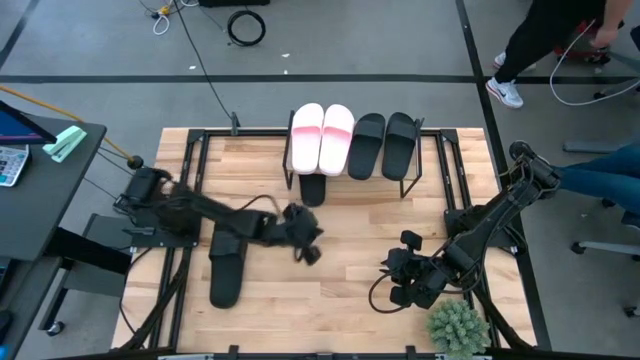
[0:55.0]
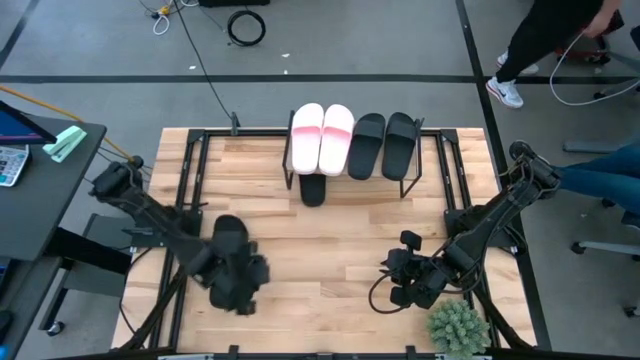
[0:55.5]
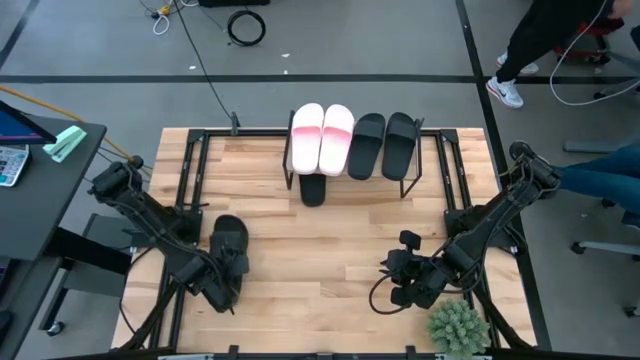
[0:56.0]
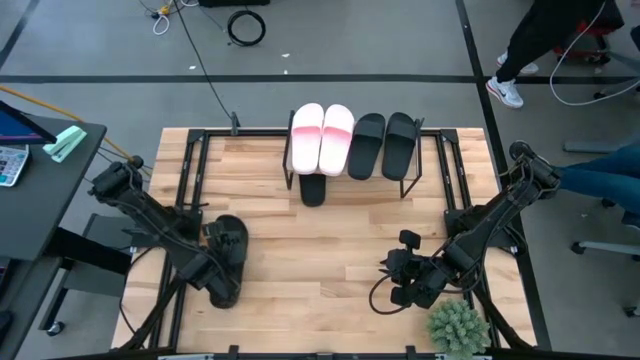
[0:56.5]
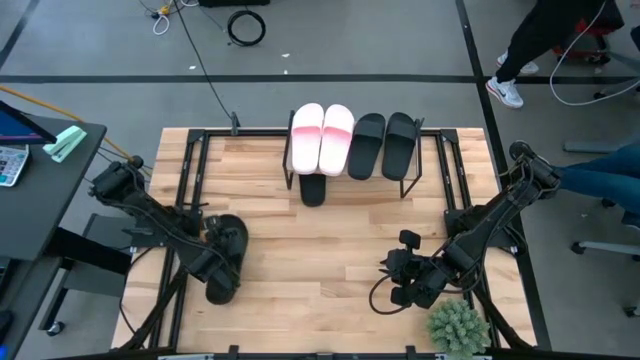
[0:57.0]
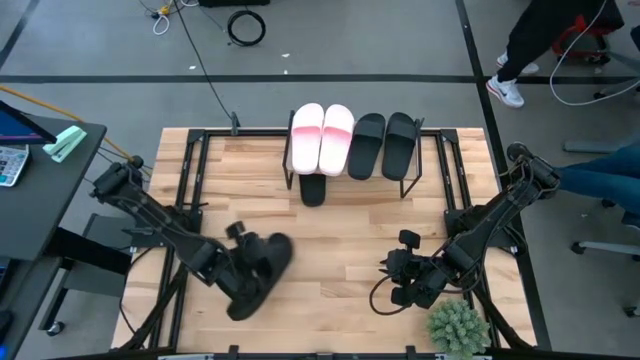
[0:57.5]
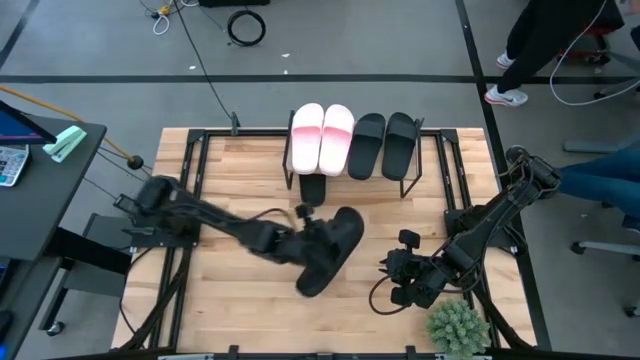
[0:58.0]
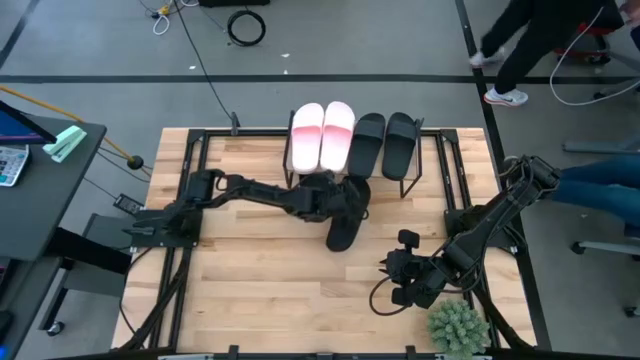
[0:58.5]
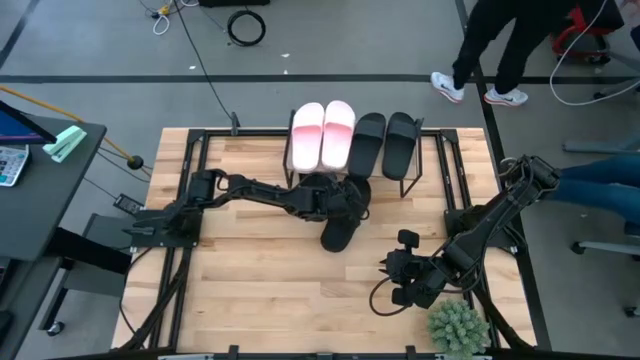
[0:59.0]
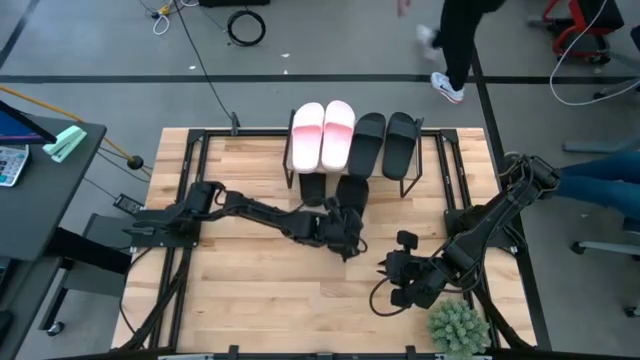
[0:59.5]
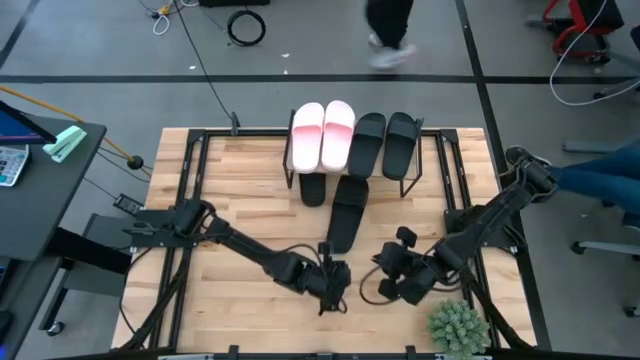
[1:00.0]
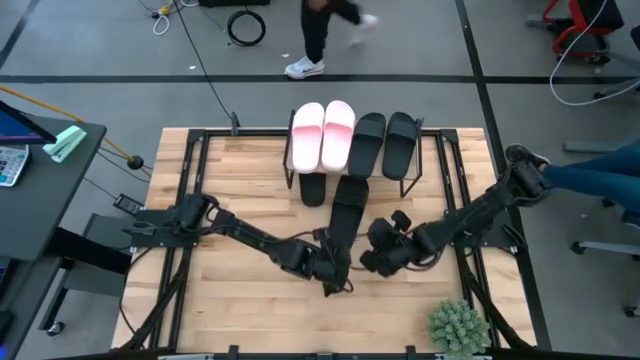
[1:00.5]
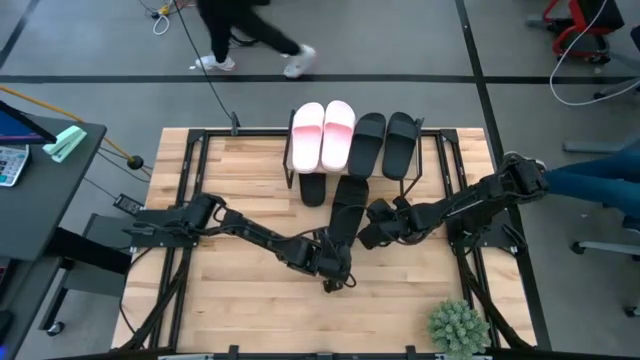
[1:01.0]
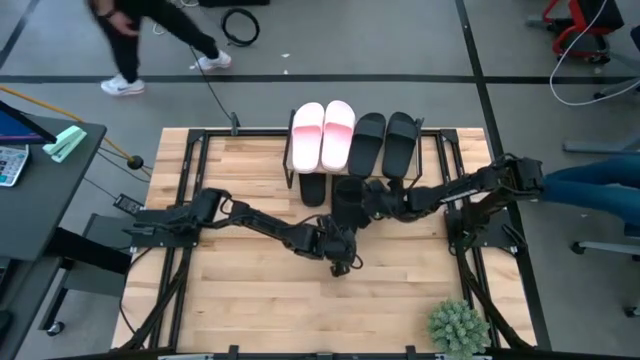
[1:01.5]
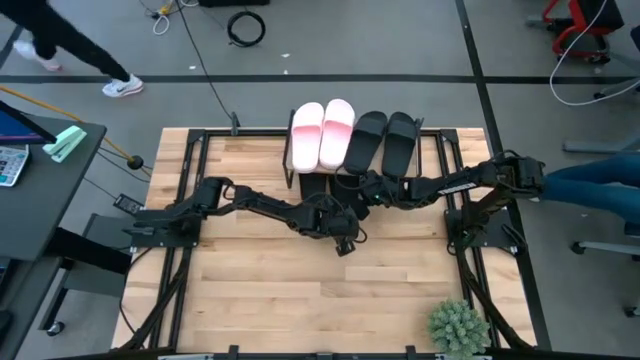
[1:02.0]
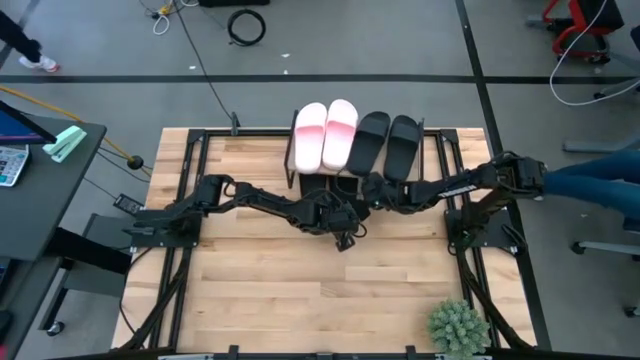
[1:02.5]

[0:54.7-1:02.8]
Task: Pick and place slides into the shelf
Put the black slide under the shelf

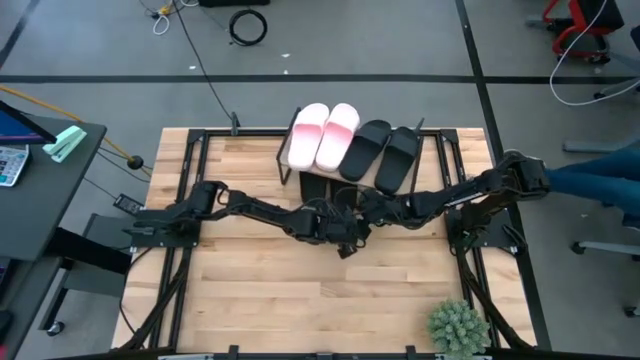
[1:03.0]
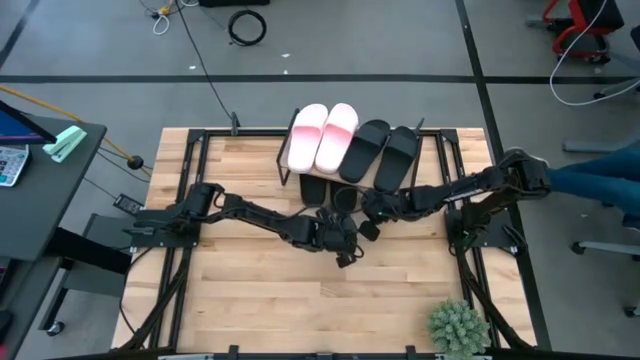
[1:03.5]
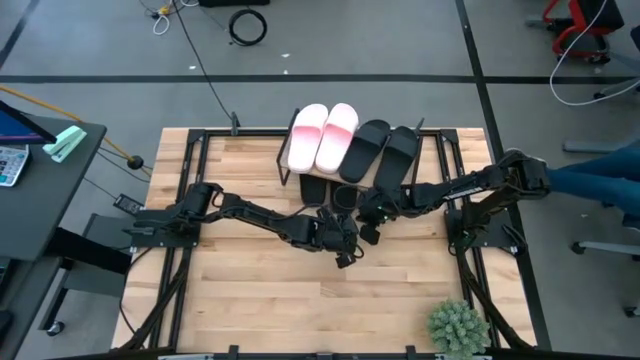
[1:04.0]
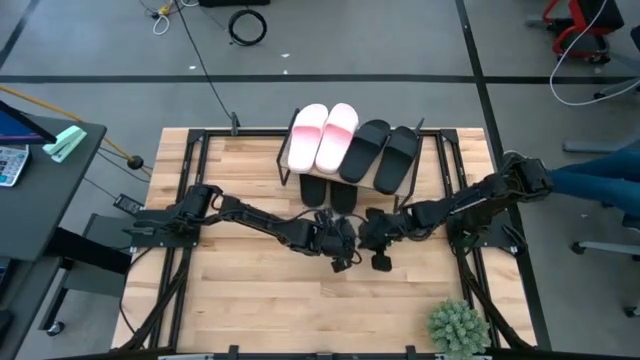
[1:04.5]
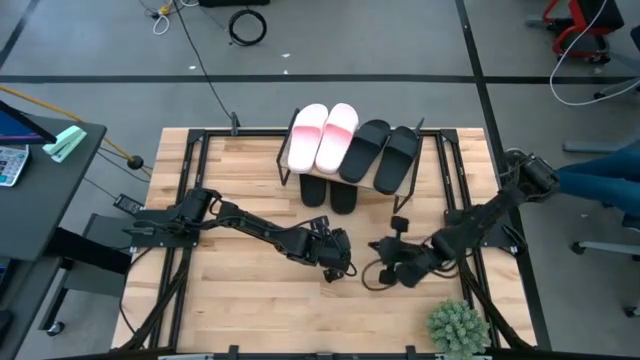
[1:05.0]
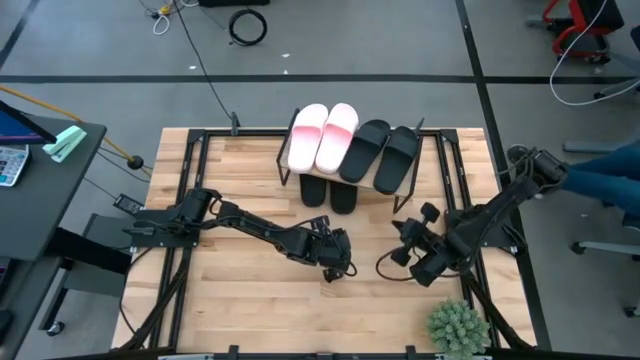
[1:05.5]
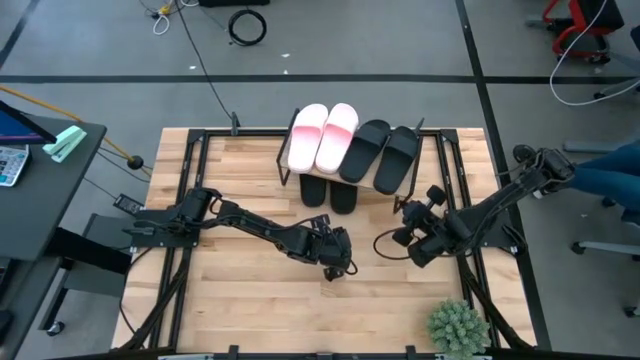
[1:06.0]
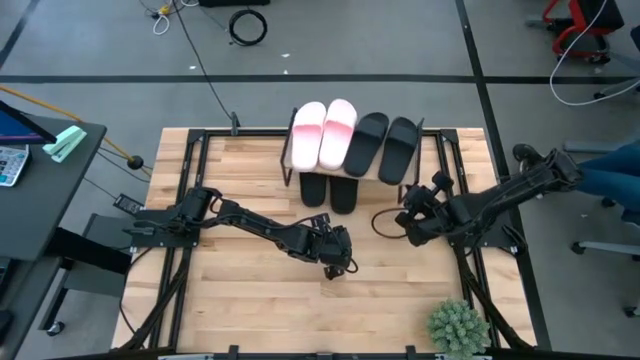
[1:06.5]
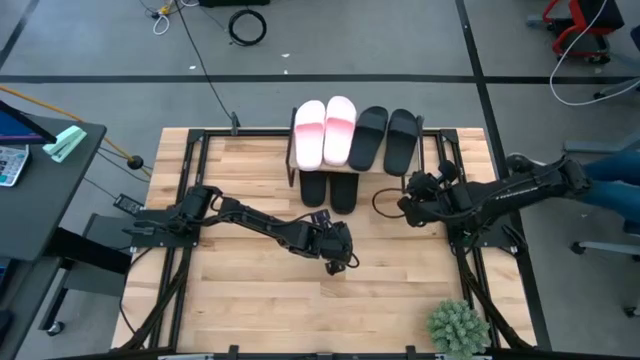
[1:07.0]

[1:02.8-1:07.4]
Adjust the shelf

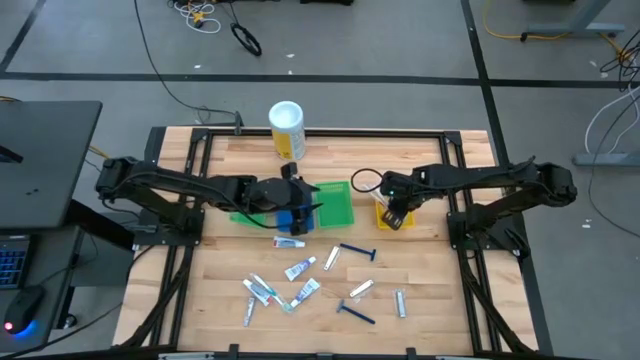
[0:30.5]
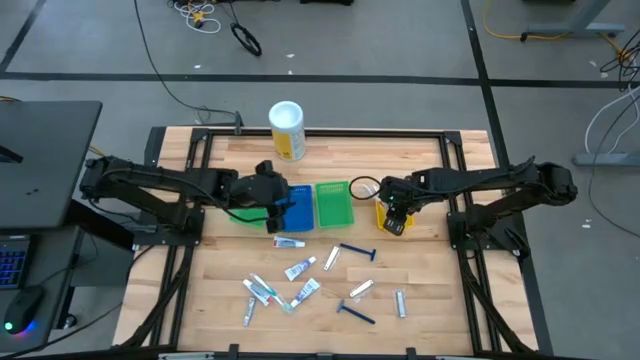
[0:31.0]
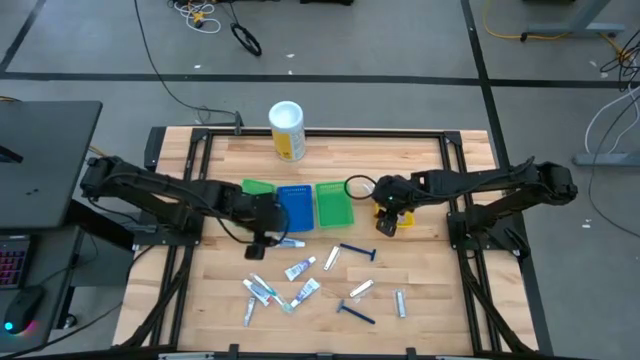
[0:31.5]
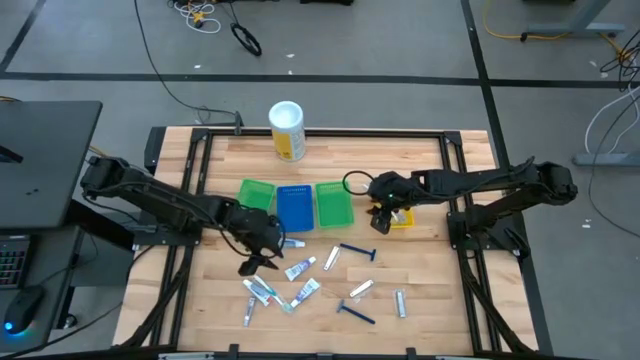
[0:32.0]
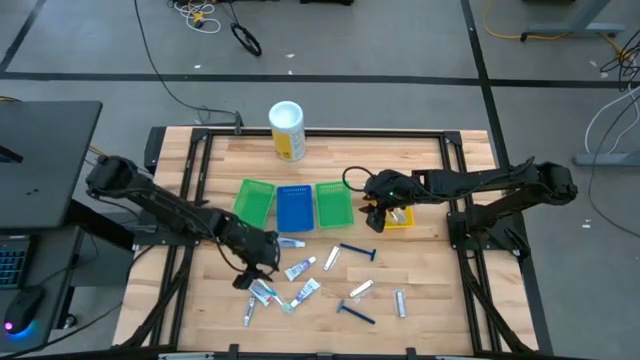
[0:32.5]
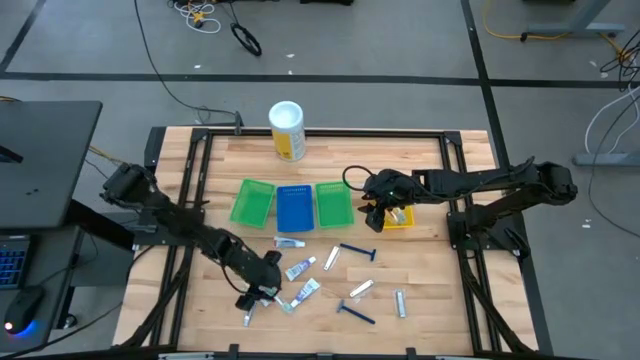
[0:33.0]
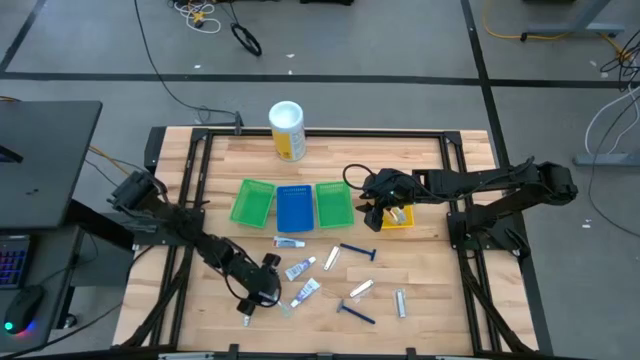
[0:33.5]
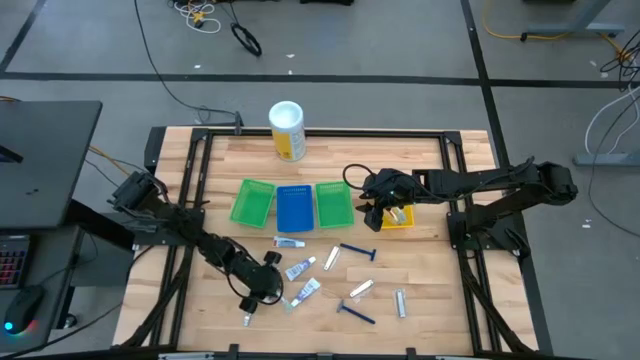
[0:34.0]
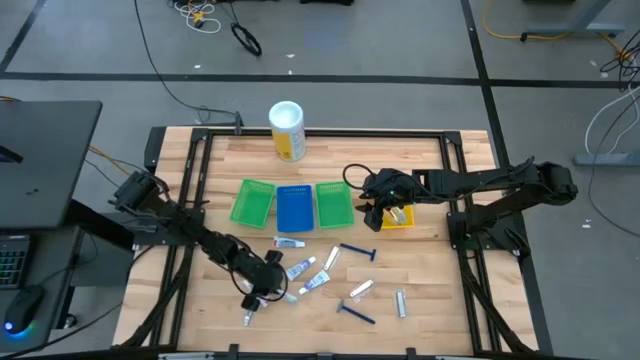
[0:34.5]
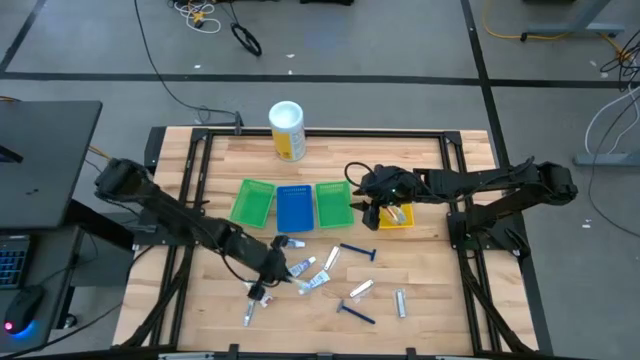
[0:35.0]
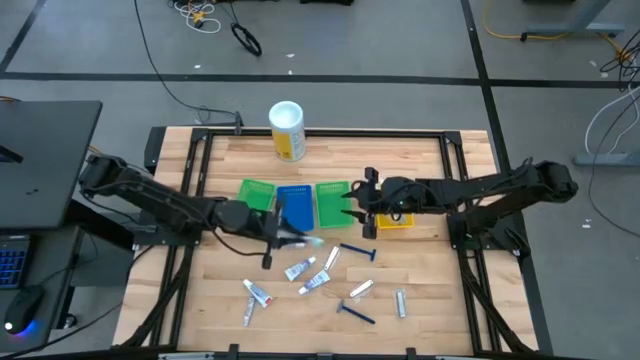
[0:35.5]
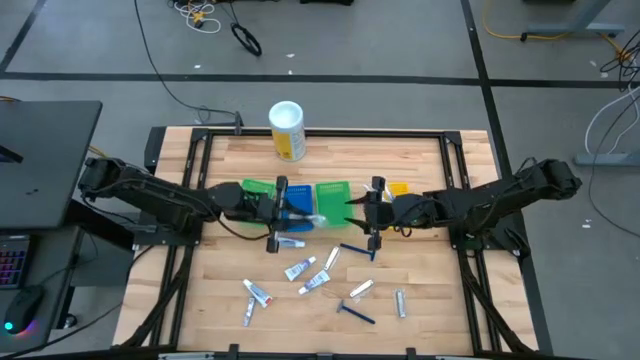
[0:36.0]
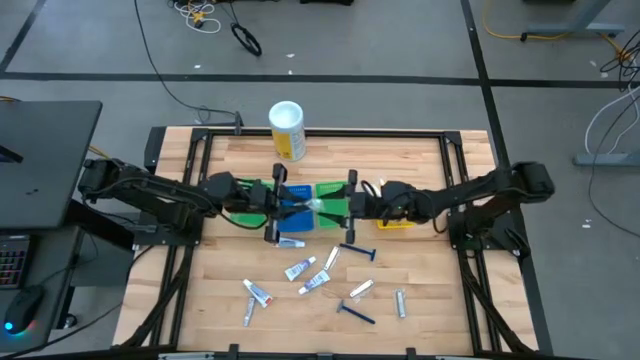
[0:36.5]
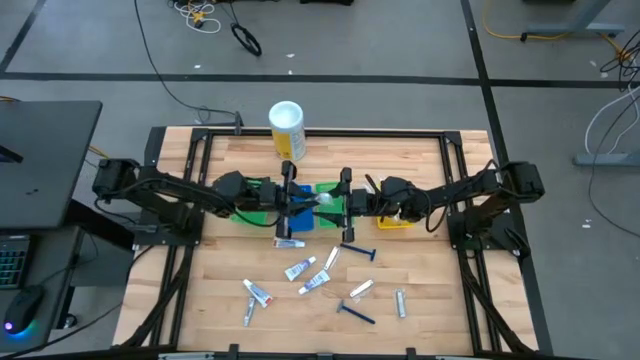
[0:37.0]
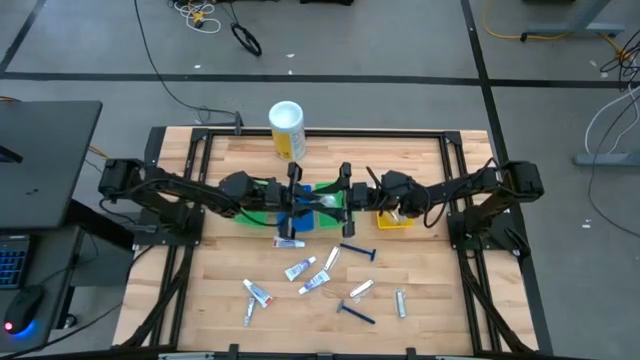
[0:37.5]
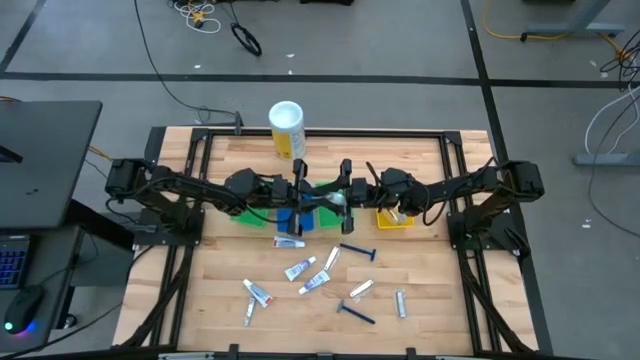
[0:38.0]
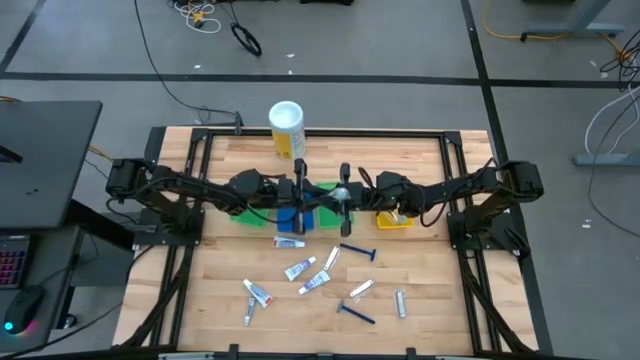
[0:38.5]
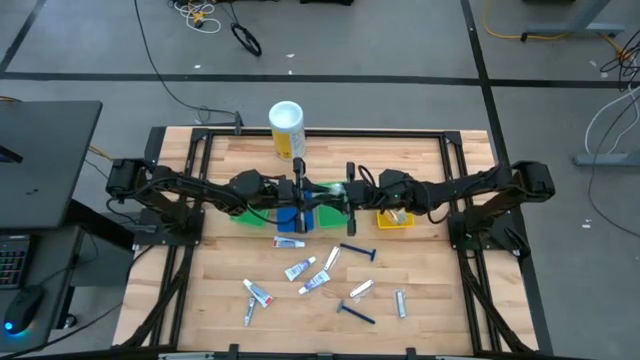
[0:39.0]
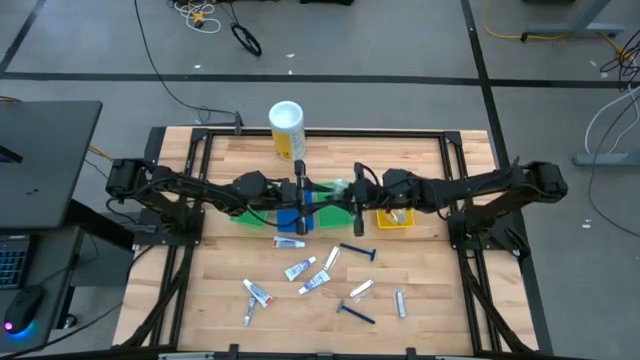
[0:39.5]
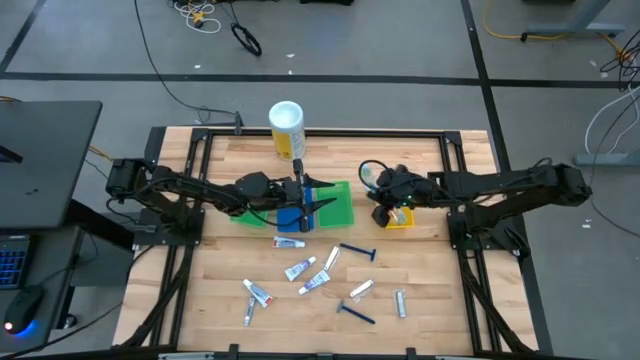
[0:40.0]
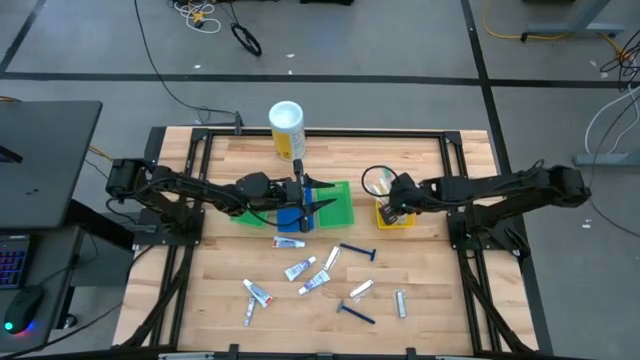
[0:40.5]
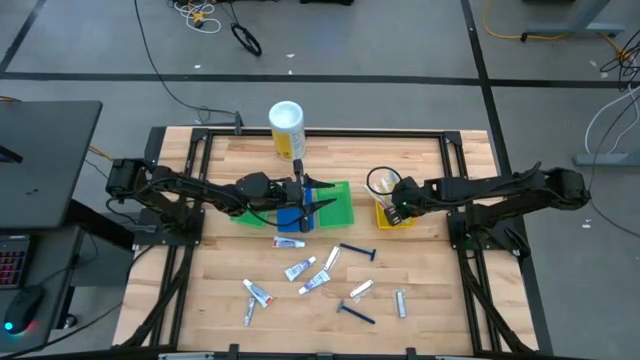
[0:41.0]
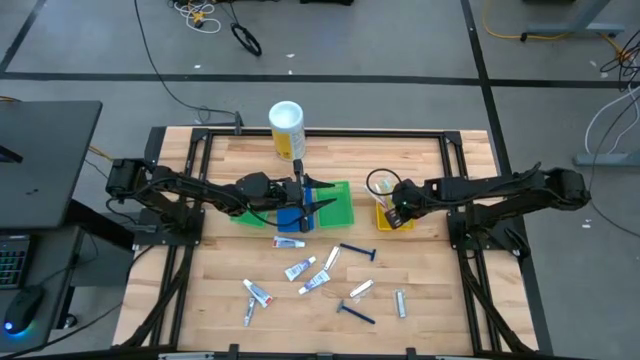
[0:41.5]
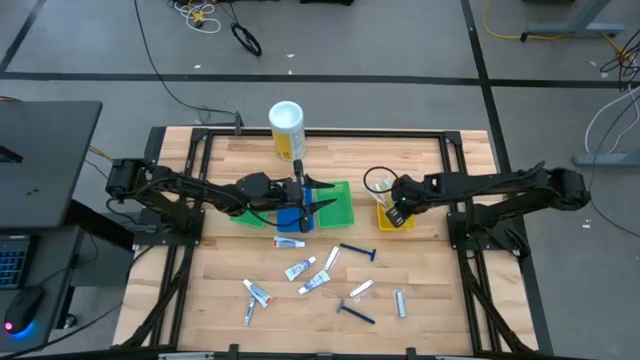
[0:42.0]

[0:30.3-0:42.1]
Task: Pick & Place Travel size toiletries
Put the green and white toothbrush into the yellow bin
